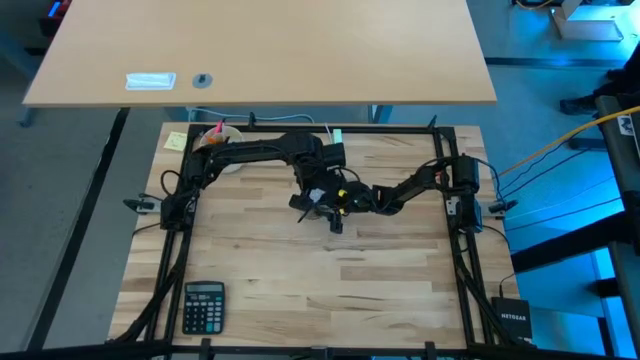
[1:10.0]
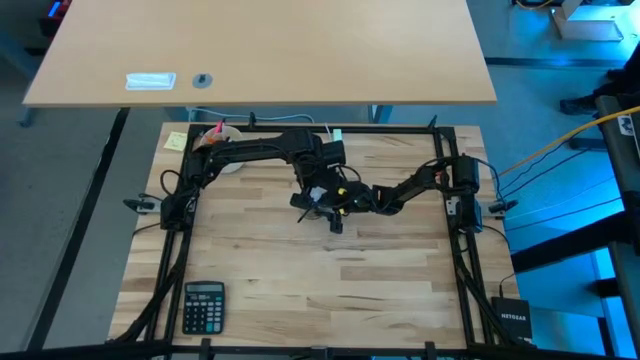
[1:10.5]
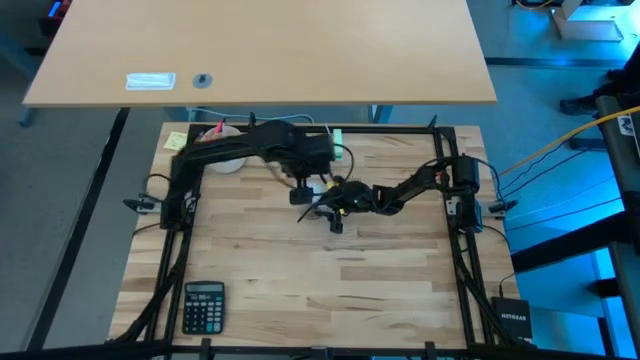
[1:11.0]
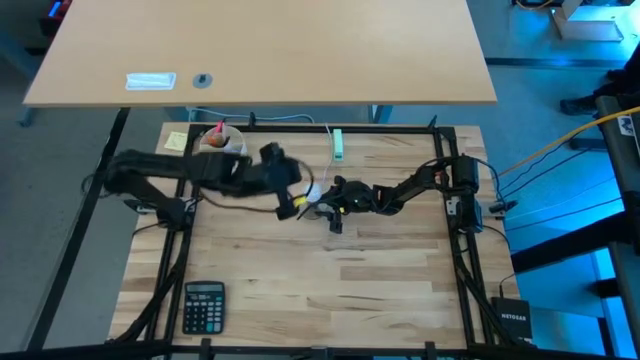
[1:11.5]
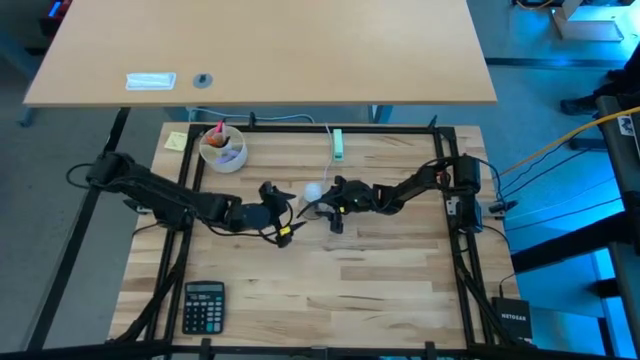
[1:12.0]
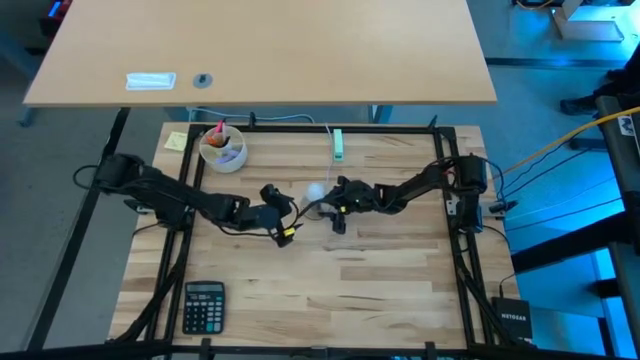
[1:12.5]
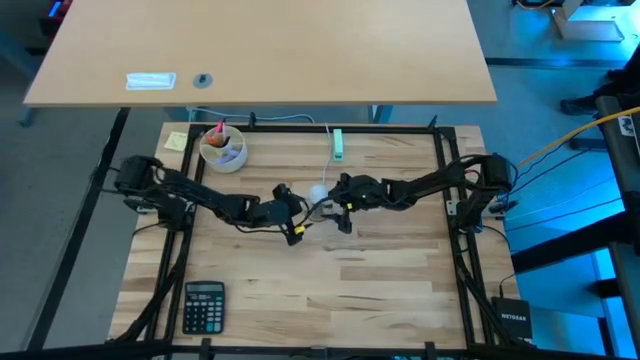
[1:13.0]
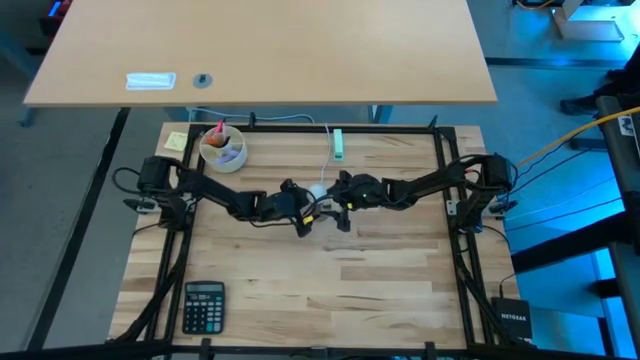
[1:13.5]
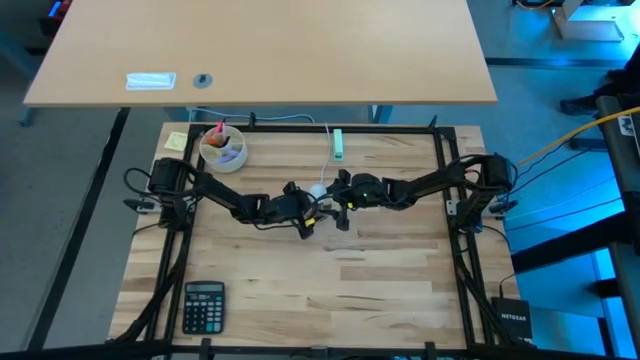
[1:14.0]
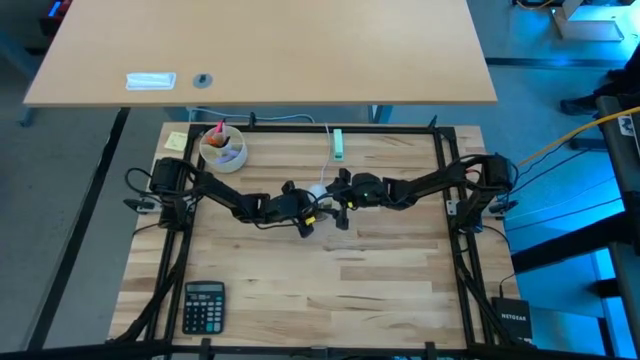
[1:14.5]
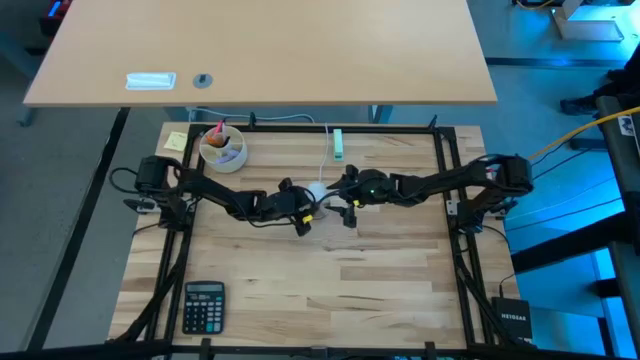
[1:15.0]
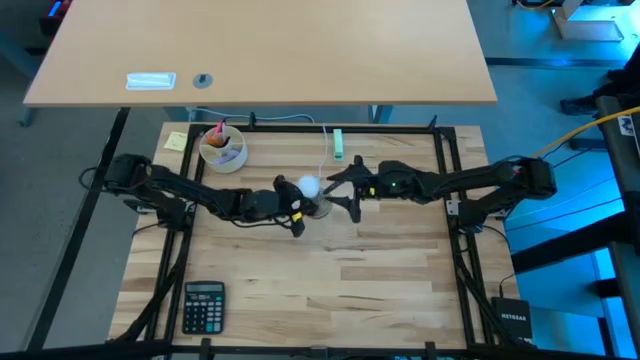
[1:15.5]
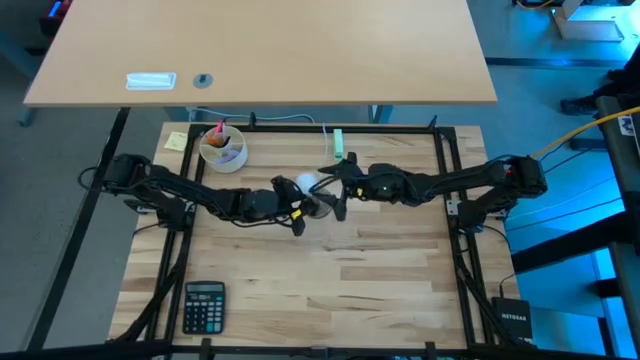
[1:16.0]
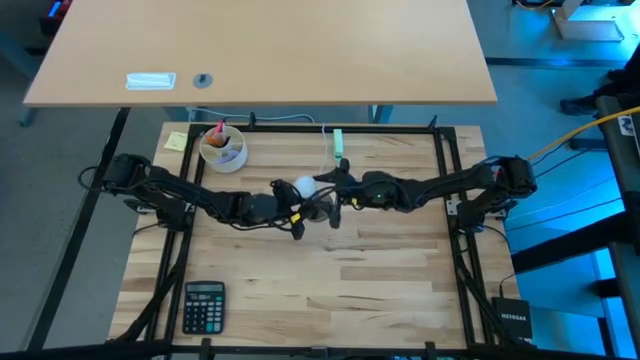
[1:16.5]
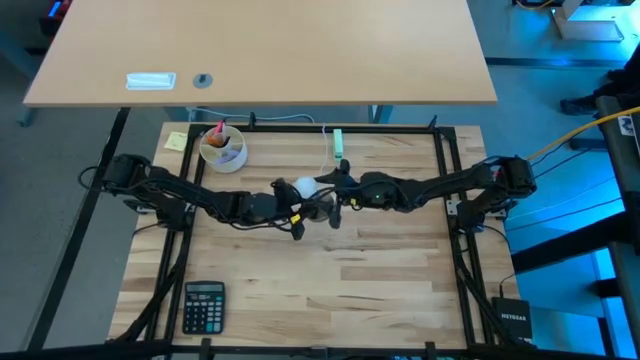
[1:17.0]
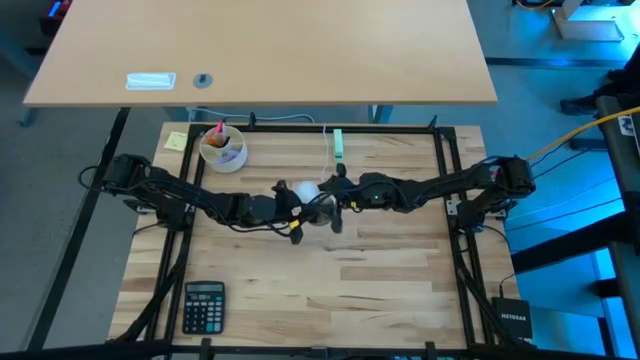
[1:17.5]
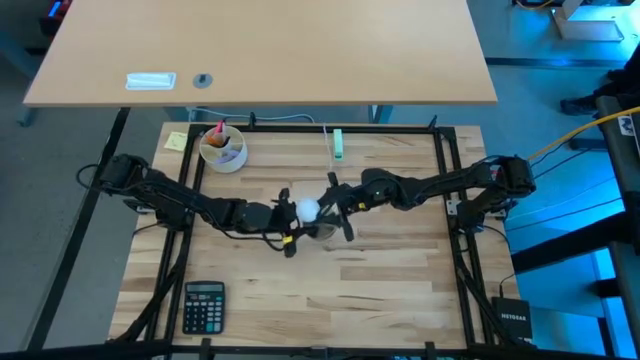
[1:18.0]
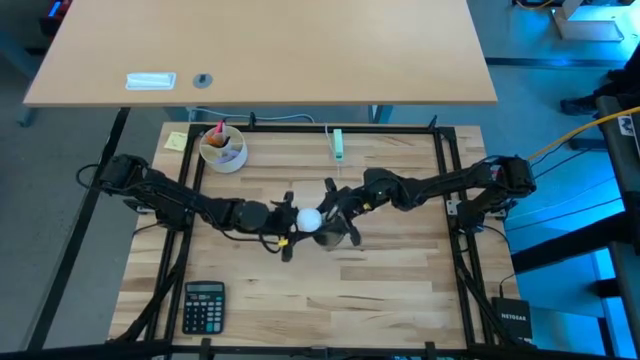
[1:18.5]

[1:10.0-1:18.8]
Task: Screw lightbulb
Remove the lightbulb from the lamp socket

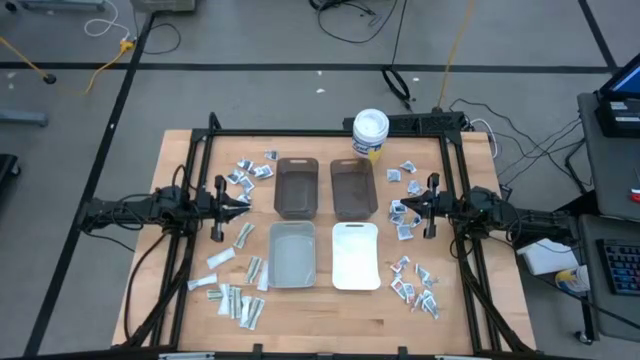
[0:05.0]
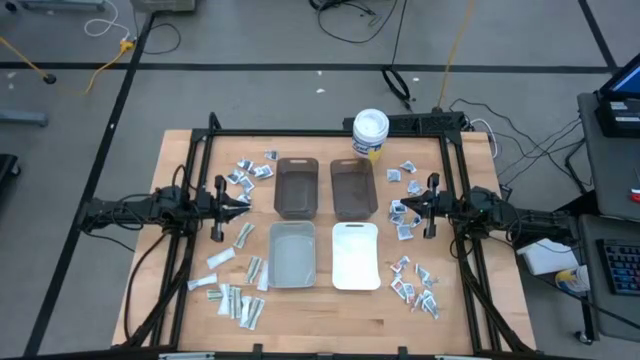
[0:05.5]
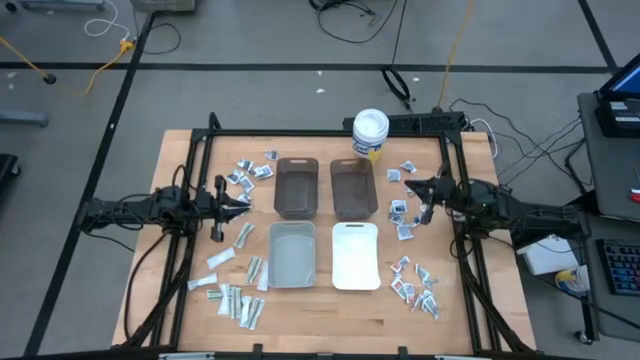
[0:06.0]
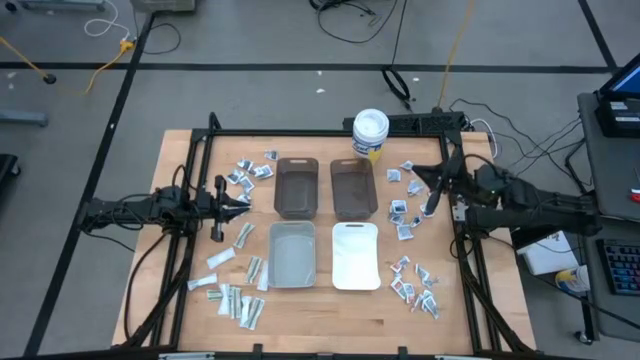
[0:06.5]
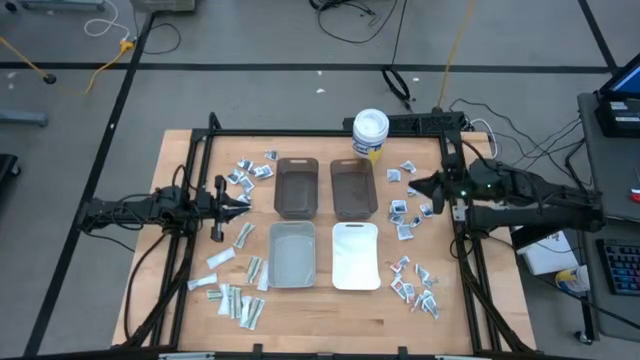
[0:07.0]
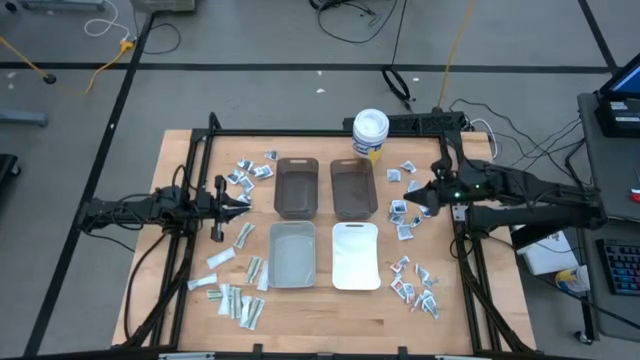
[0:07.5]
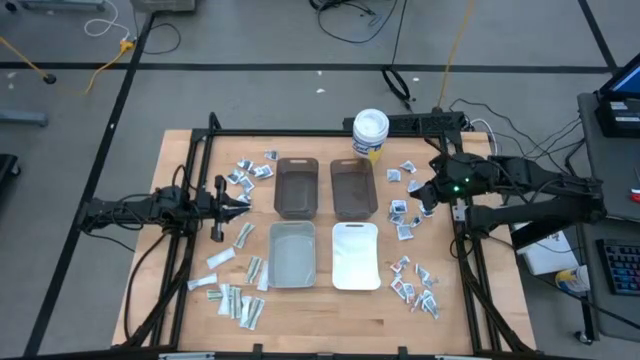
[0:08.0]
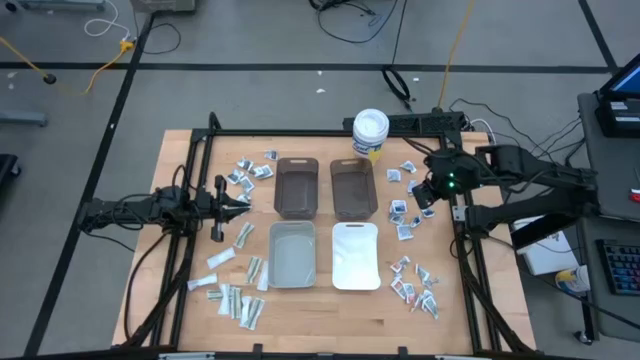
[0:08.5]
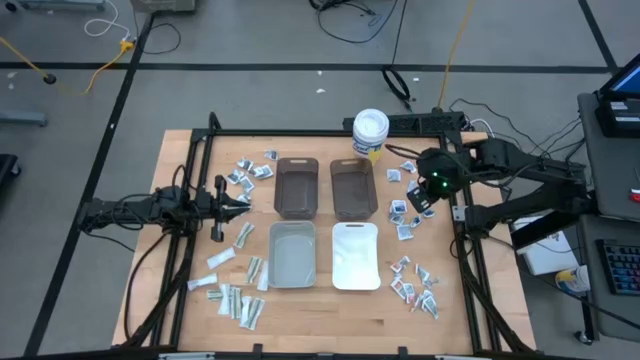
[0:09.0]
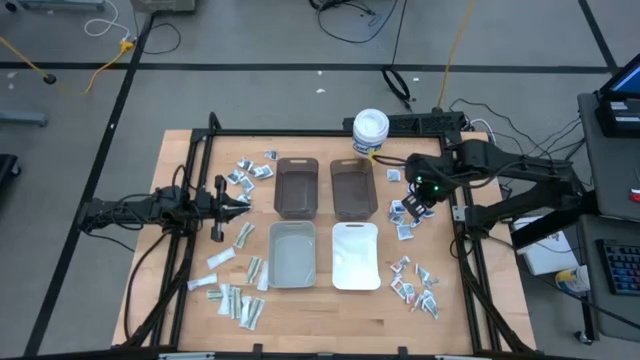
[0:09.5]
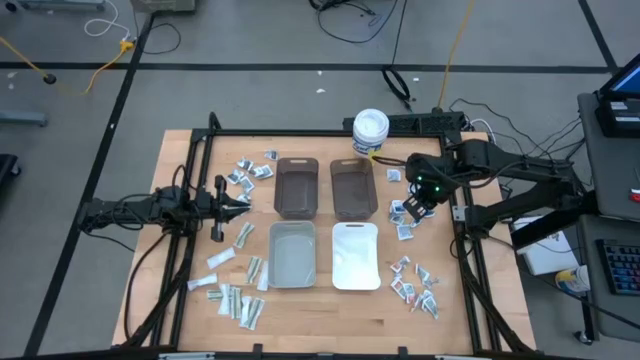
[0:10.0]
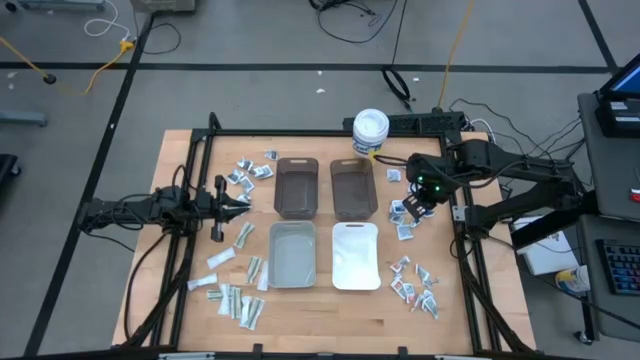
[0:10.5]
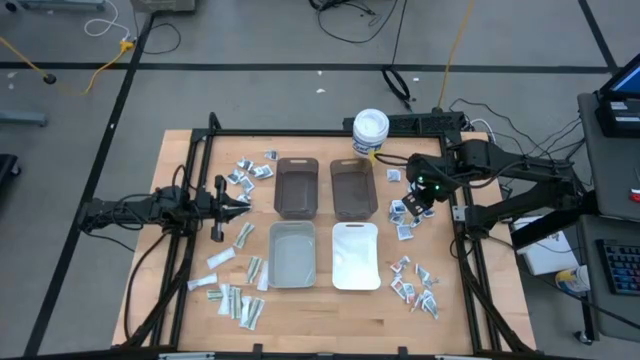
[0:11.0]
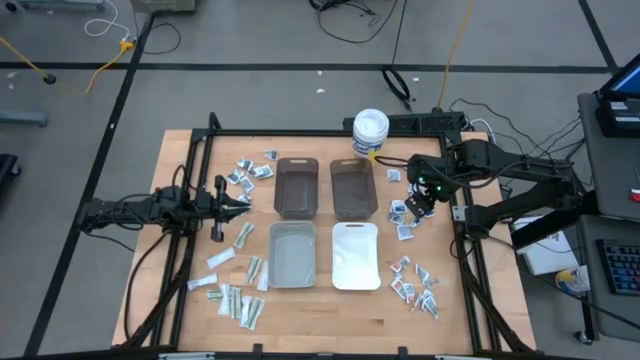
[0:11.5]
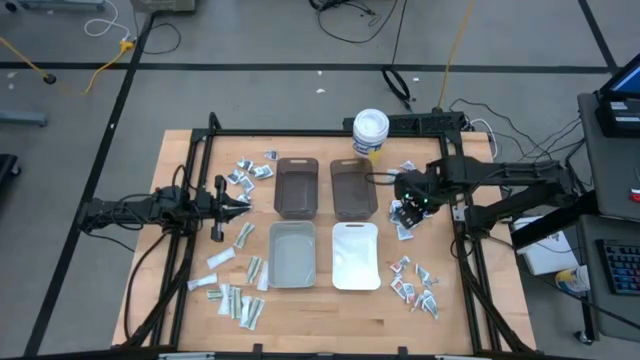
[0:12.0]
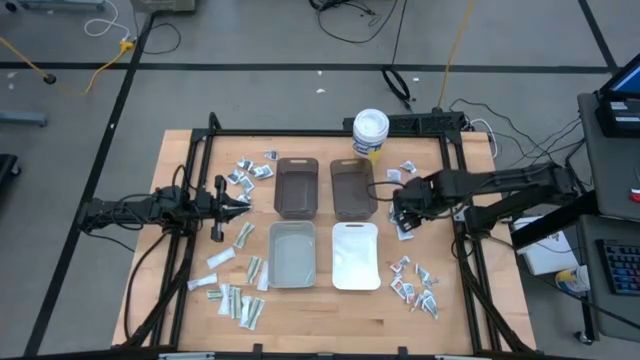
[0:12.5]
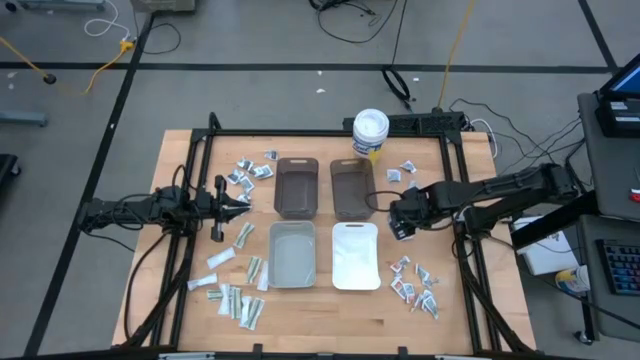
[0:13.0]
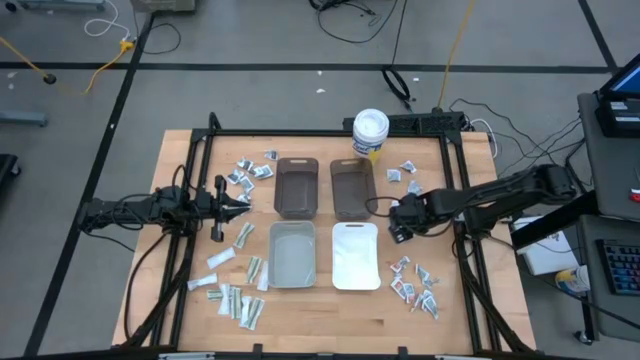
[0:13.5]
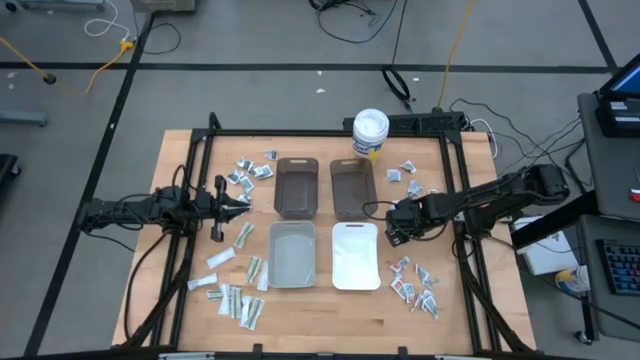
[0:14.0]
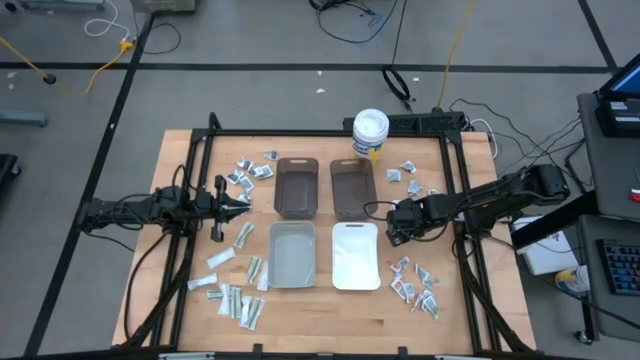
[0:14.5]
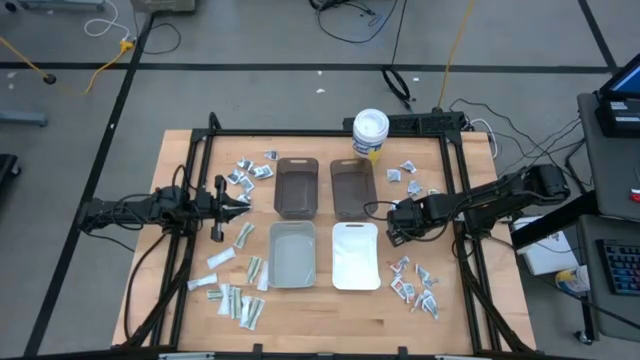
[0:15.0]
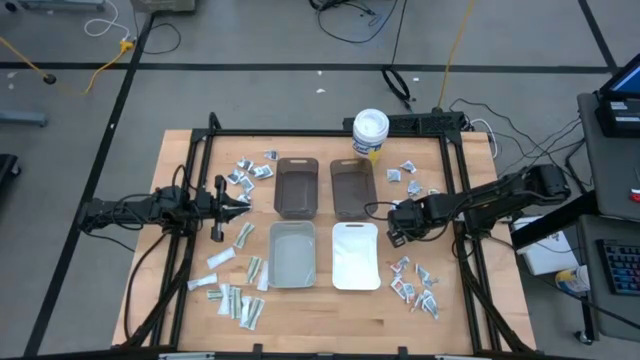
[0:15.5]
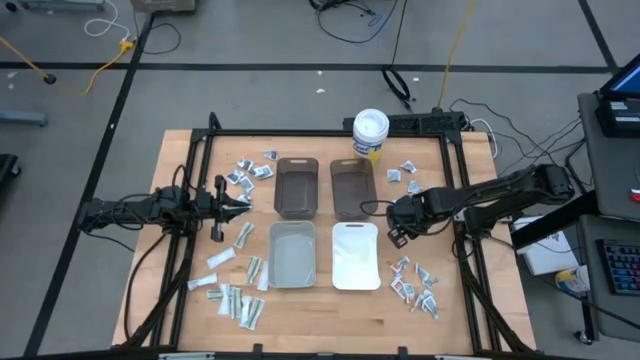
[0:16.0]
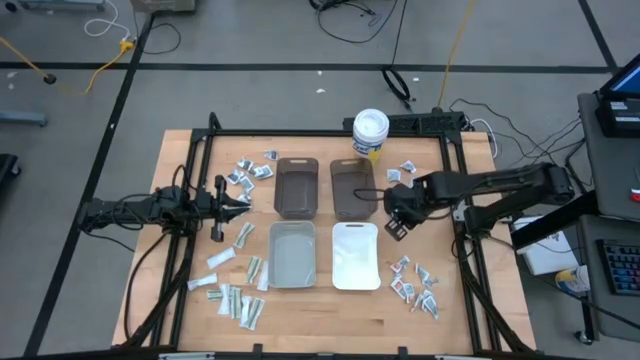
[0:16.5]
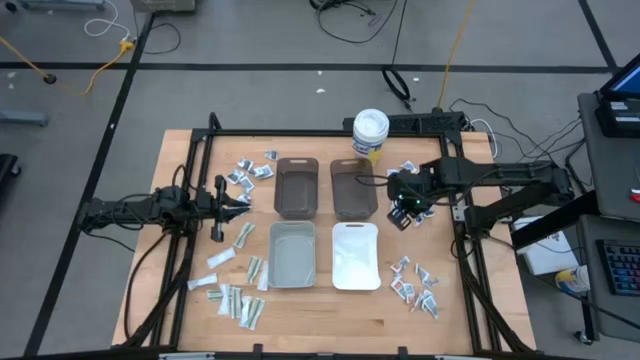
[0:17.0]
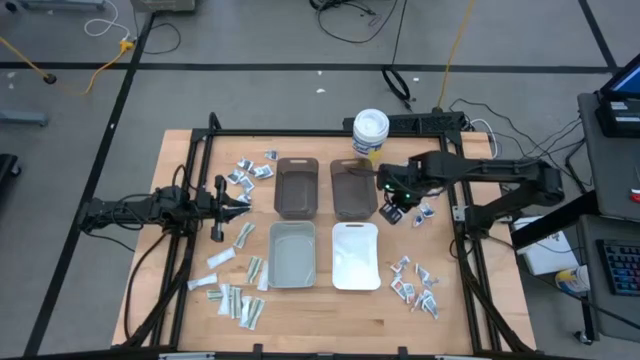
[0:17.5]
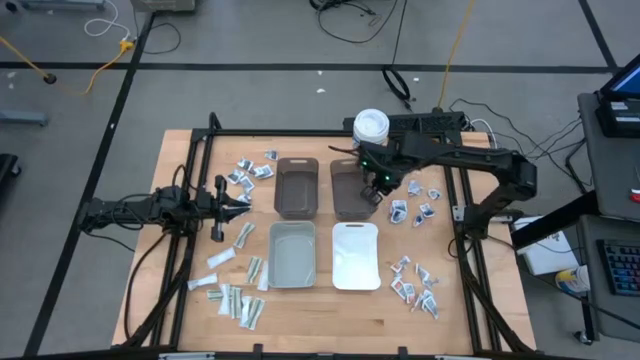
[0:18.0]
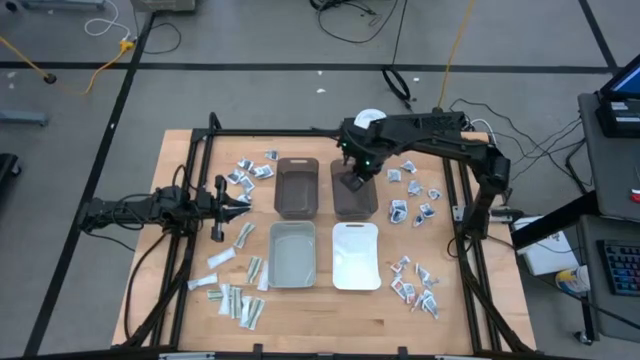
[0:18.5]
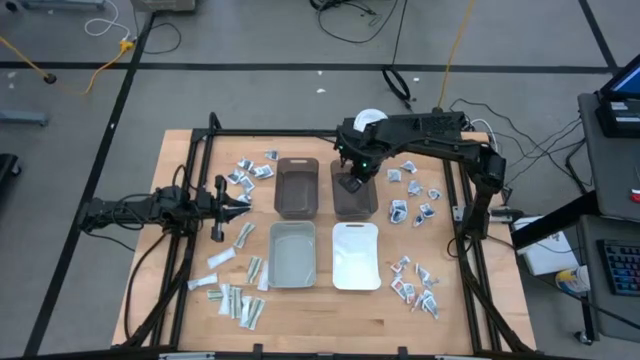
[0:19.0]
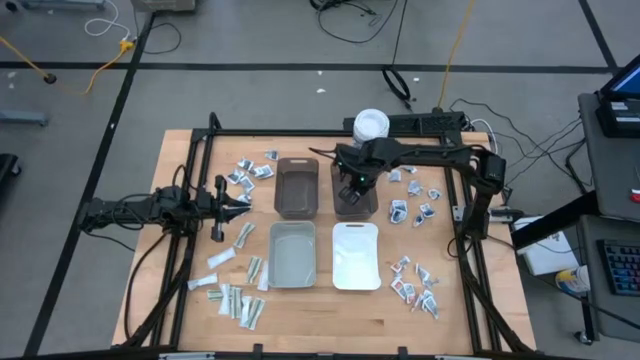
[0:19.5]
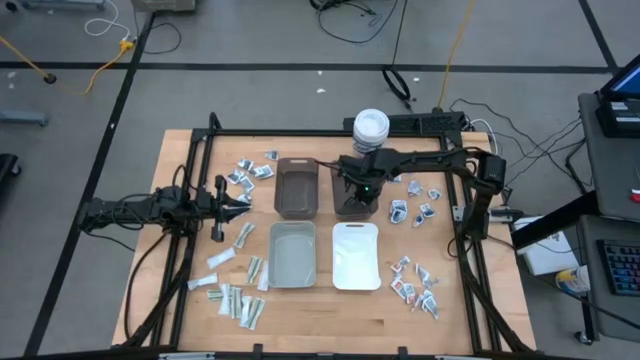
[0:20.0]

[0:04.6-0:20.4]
Task: Pick & Place First Aid Supplies
Put the blue pad into the right black bin
